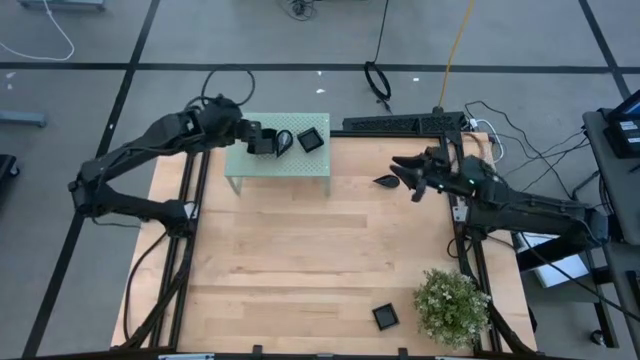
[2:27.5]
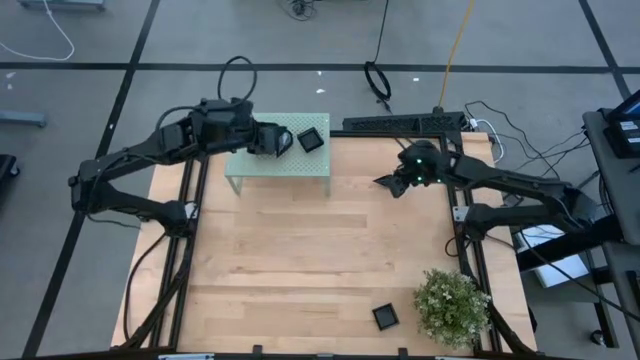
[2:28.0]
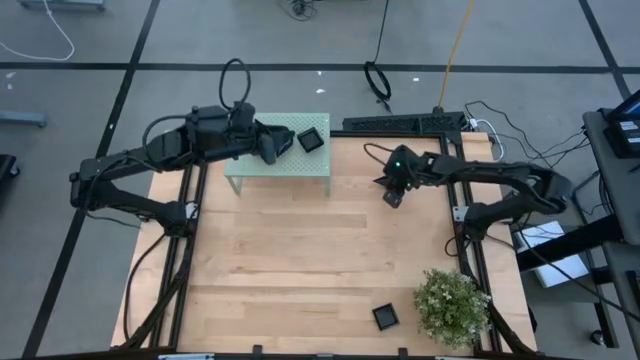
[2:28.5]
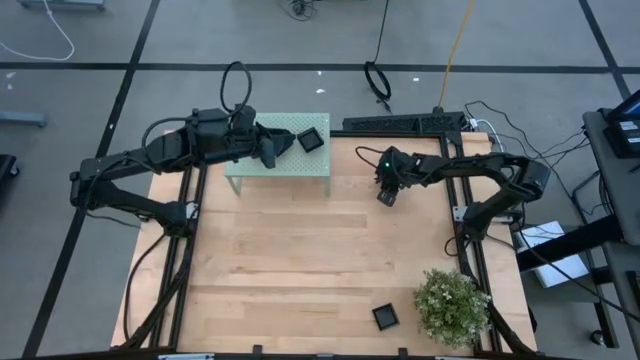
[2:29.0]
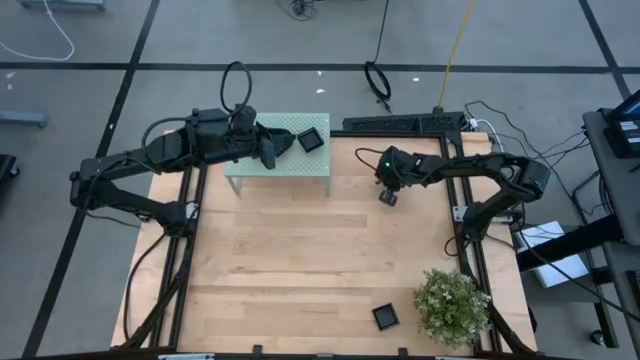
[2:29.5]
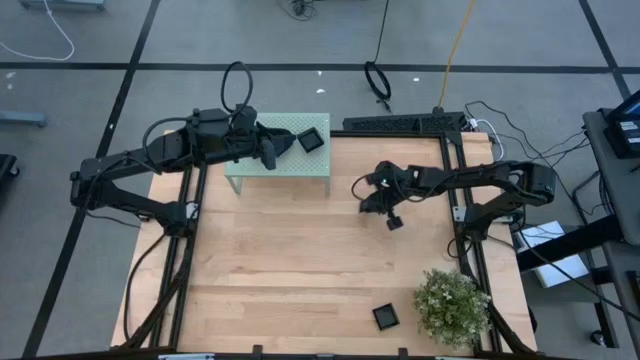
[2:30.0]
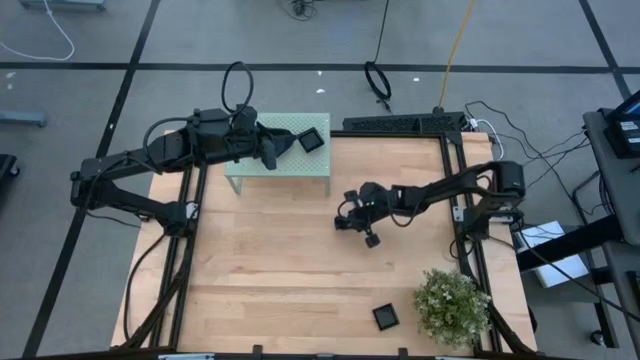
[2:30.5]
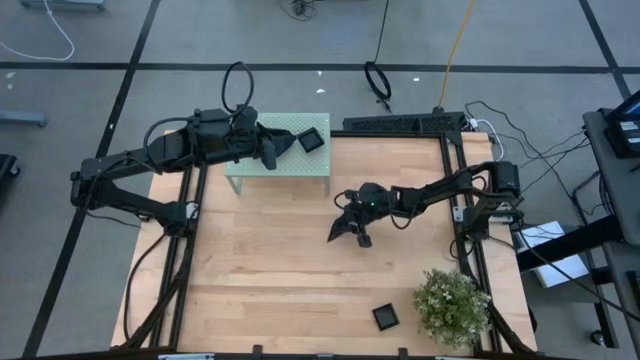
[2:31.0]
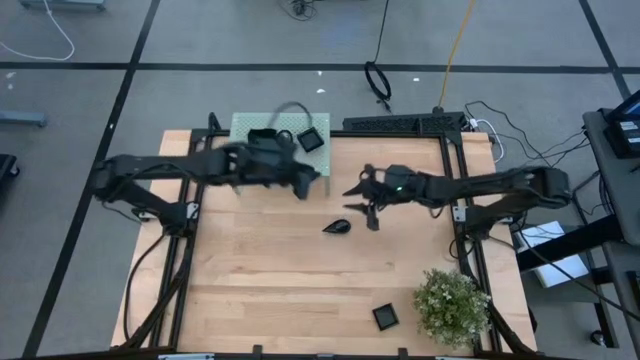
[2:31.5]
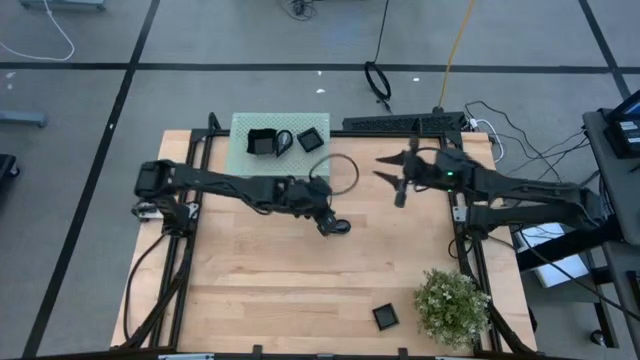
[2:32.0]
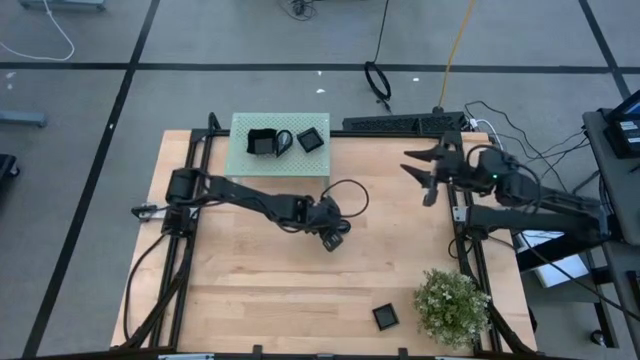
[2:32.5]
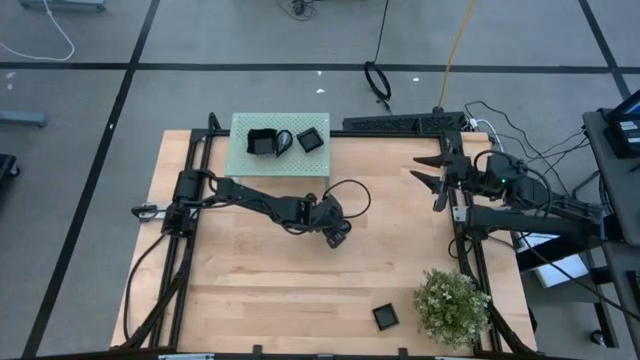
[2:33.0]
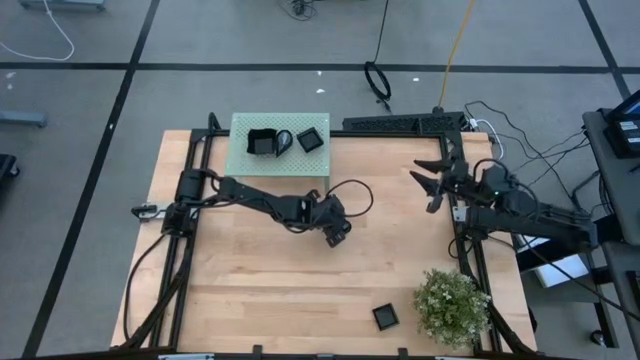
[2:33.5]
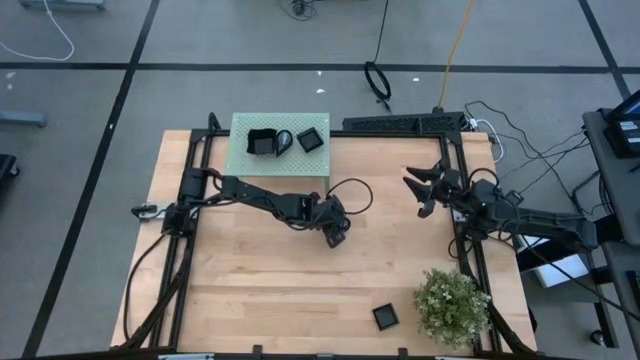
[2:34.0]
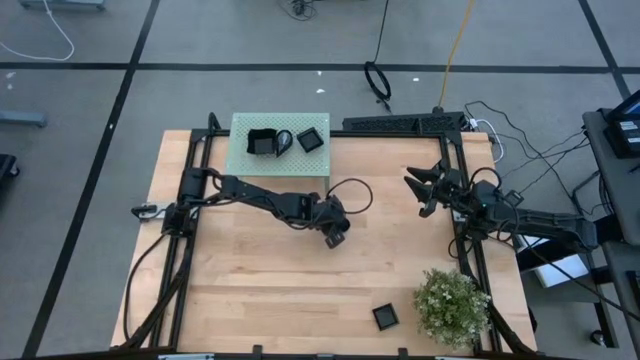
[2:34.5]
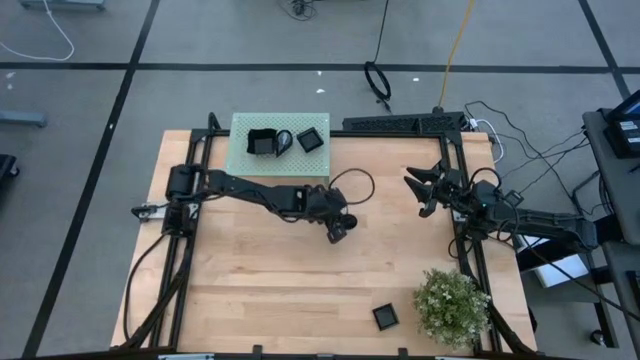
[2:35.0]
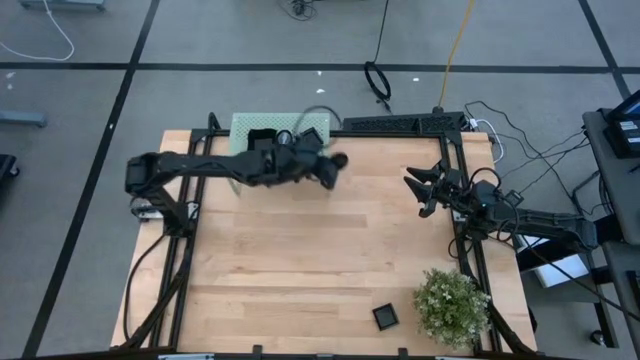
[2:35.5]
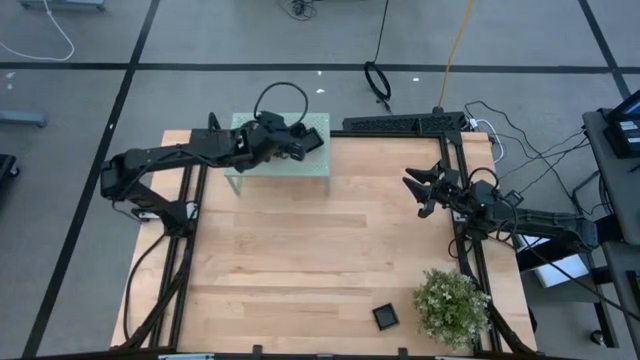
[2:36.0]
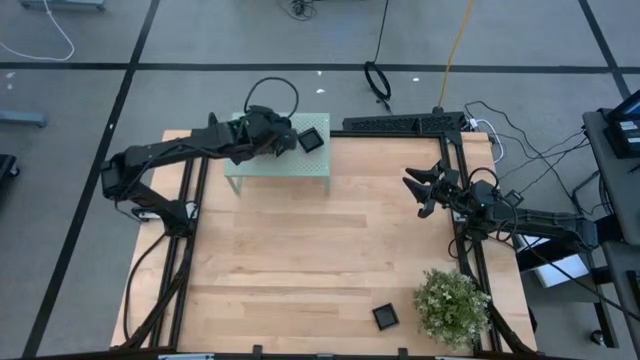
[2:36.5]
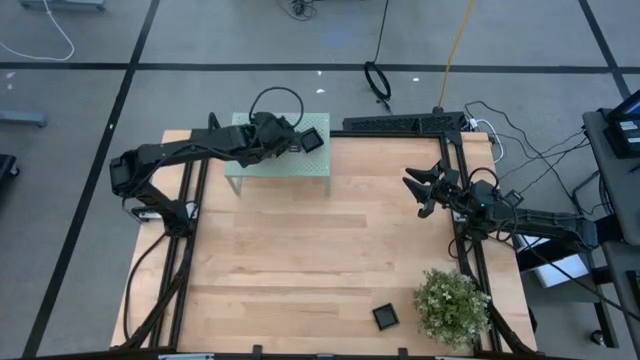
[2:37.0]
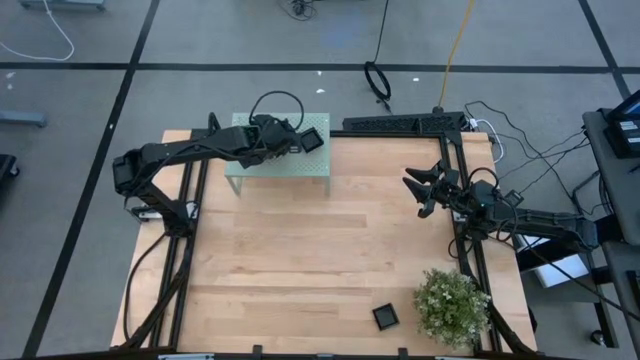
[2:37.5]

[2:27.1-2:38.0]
Task: Pick & Place Mini shaped plates
Stack the drop shaped plate on top of the stacked drop shaped plates on the shelf

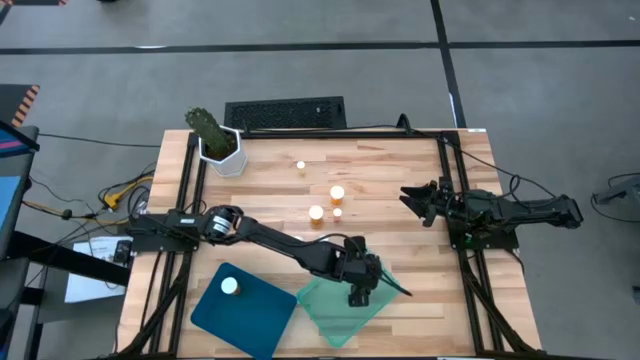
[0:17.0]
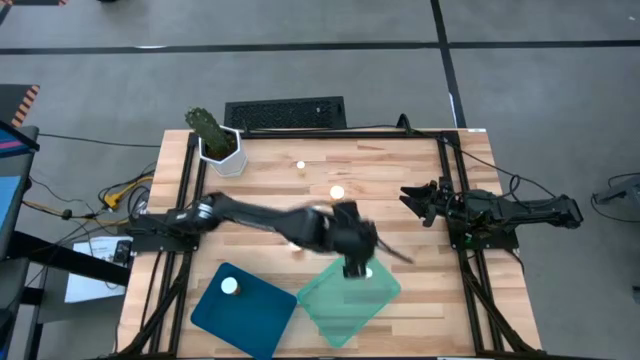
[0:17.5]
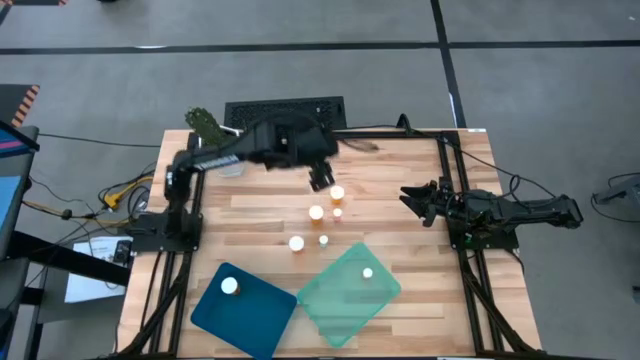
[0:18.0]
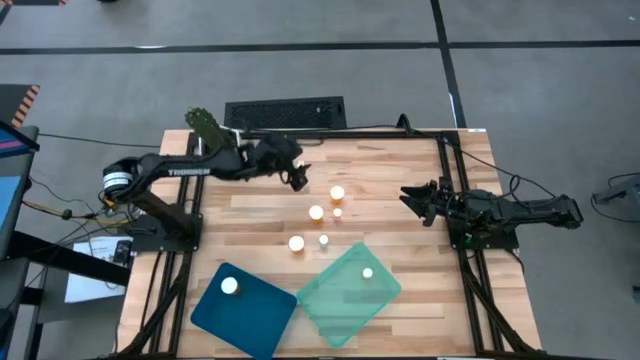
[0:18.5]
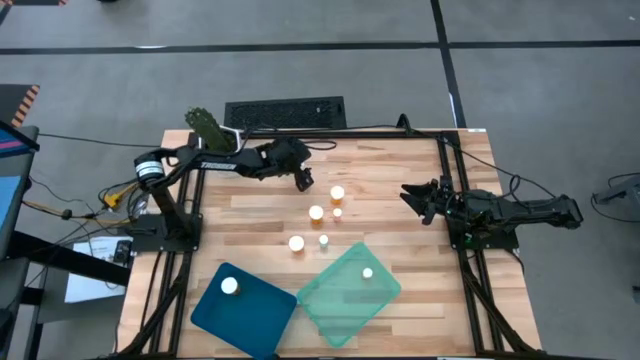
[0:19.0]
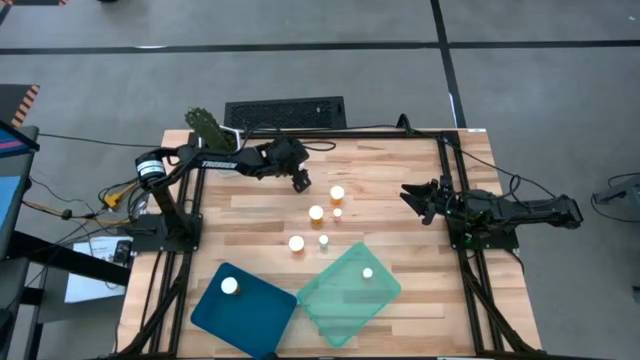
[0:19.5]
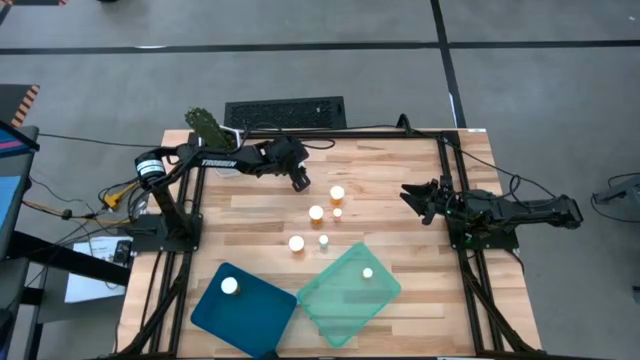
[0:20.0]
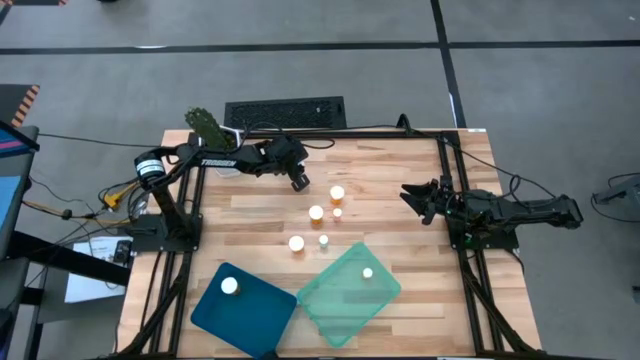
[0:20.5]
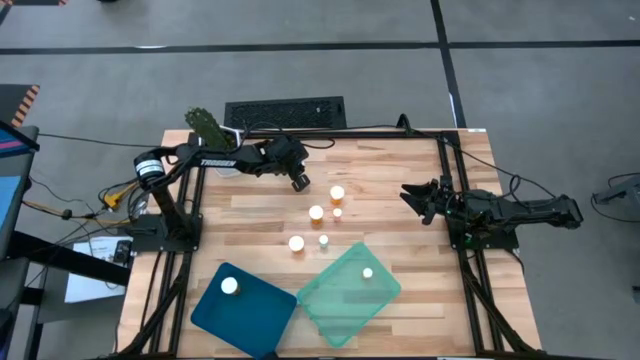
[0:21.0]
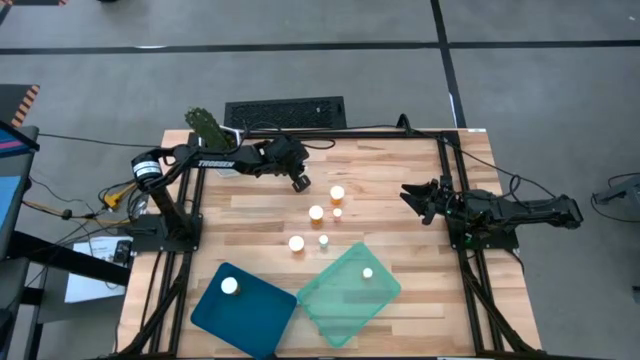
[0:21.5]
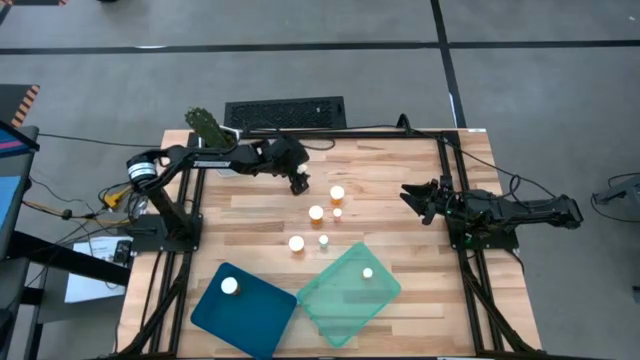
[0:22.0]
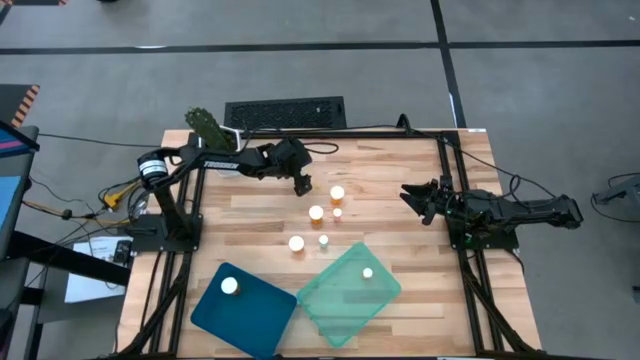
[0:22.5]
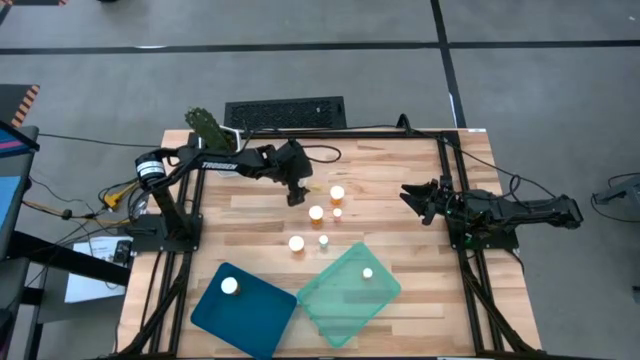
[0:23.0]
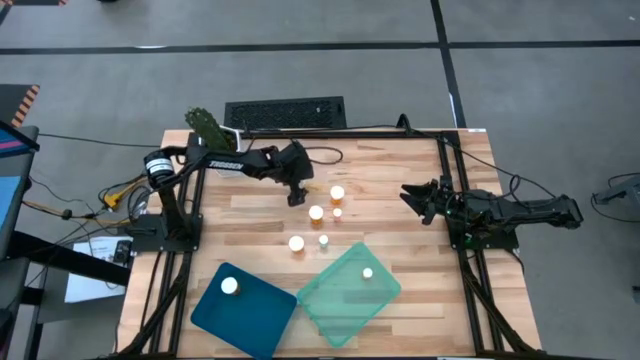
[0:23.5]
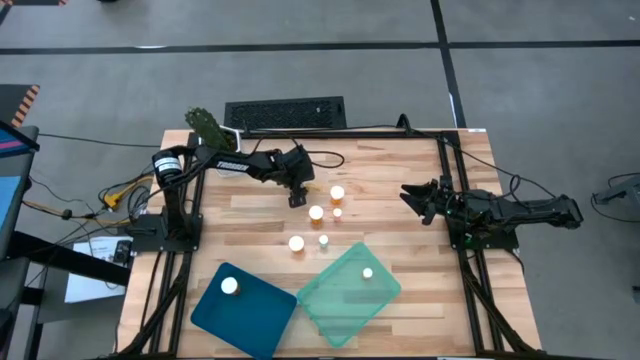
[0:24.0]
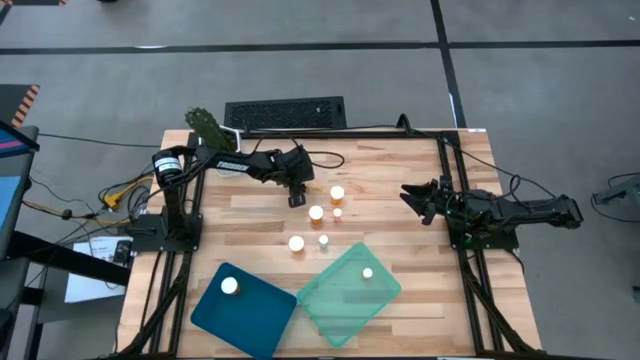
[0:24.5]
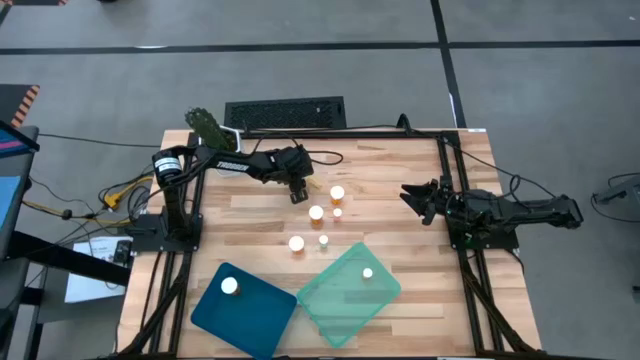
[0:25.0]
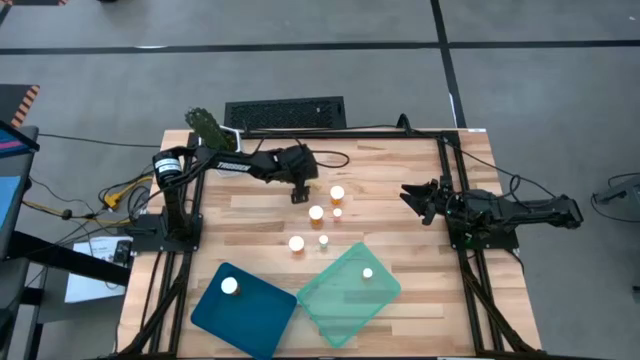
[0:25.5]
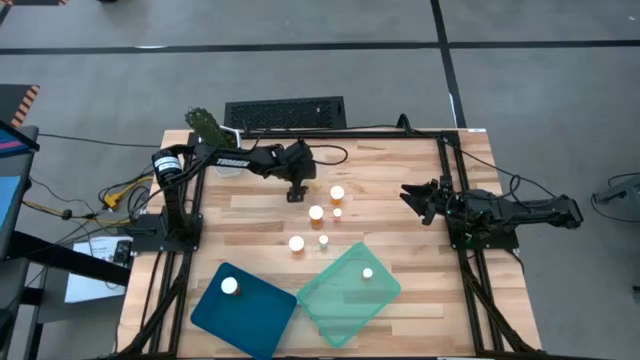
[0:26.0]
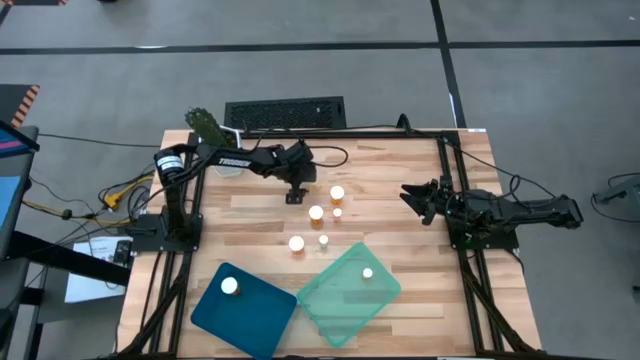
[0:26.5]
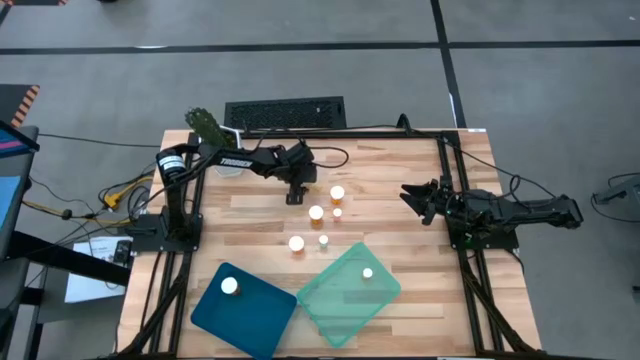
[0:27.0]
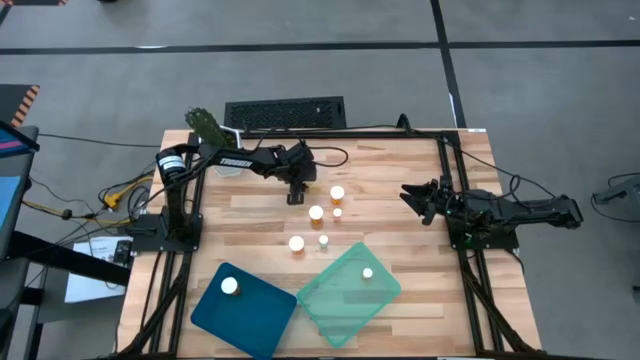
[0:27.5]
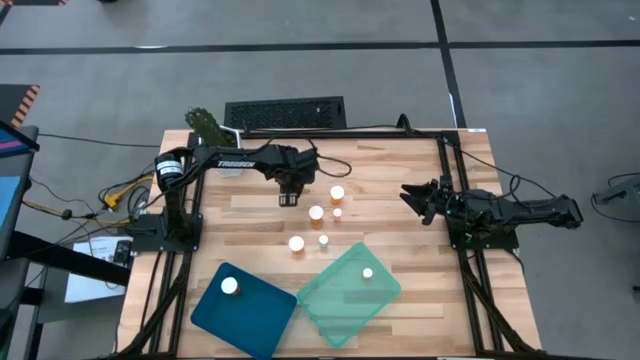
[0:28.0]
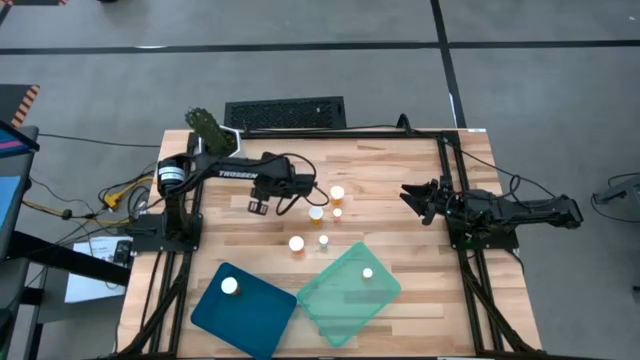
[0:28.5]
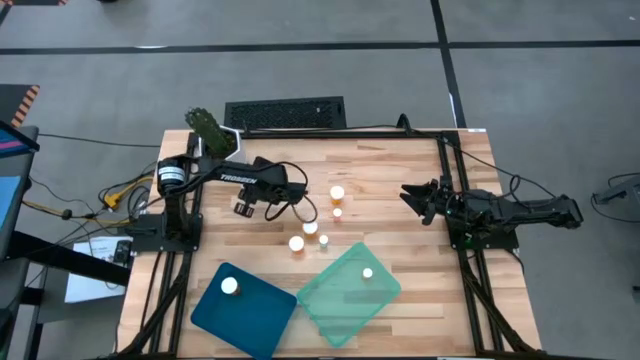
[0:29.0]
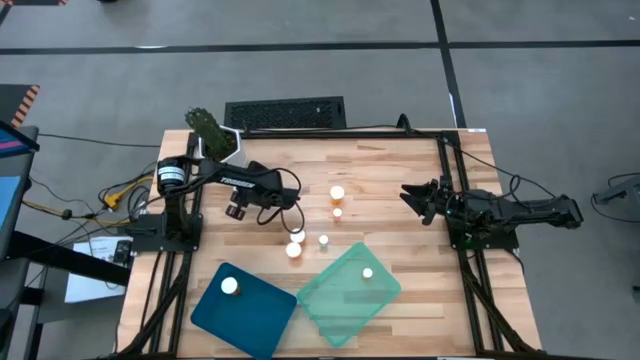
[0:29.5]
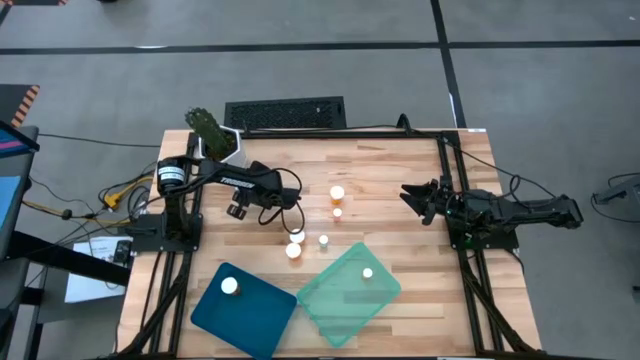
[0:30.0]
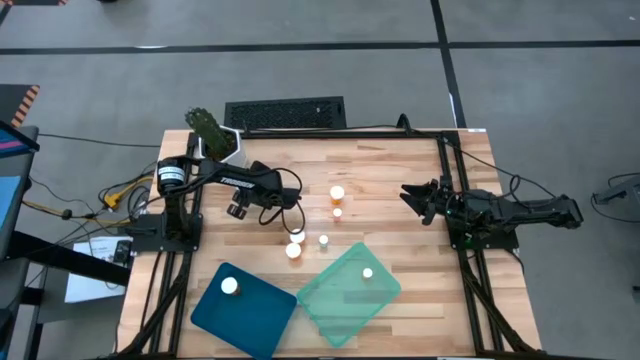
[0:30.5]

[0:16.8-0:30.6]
Task: Pick and place medicine bottles into bin by pill shape (circle, oval)
Put the small yellow pill bottle into the green bin
